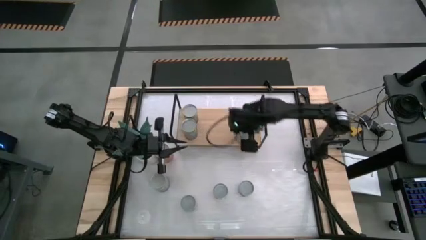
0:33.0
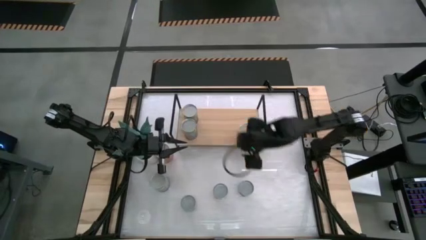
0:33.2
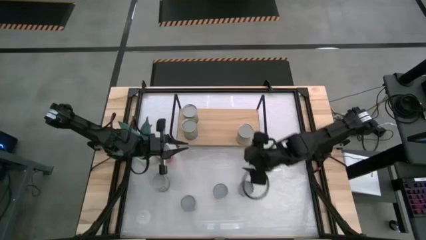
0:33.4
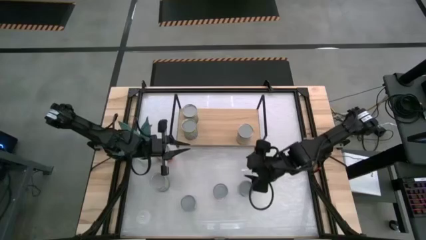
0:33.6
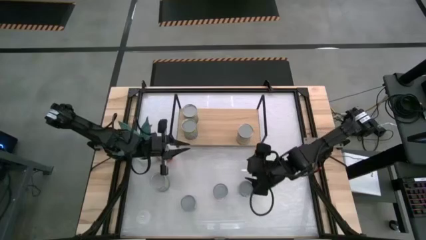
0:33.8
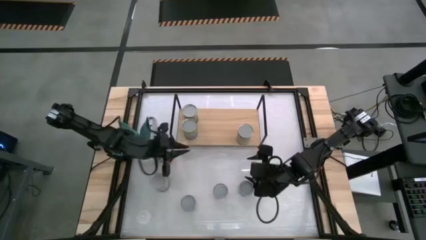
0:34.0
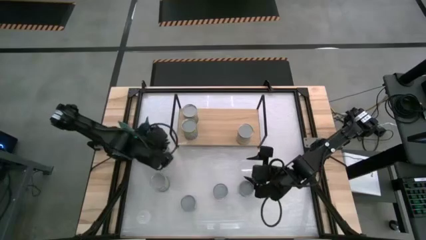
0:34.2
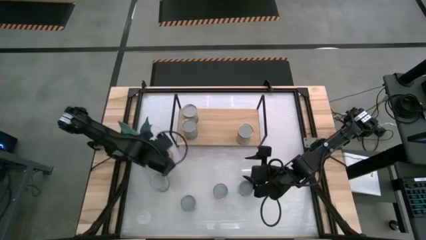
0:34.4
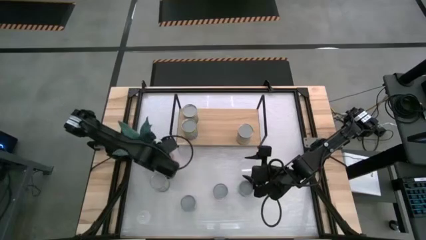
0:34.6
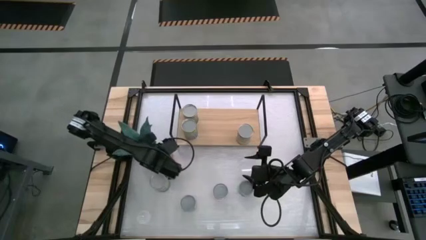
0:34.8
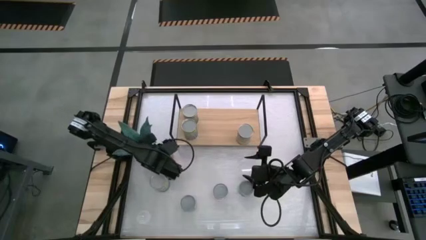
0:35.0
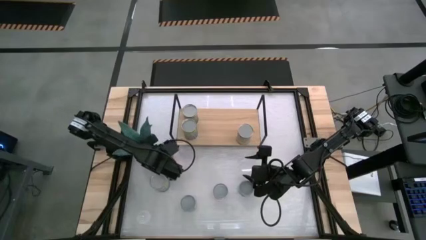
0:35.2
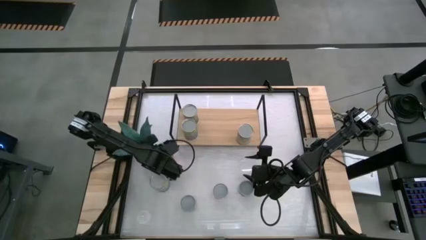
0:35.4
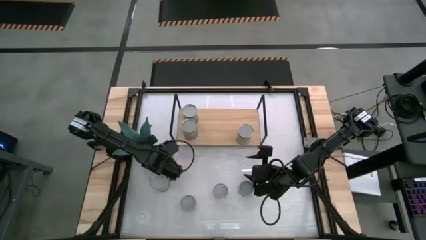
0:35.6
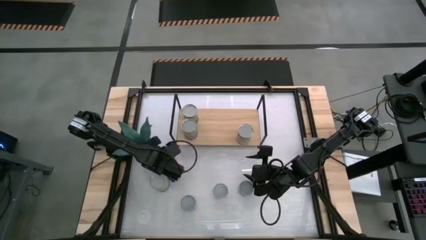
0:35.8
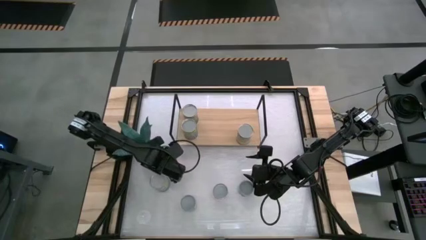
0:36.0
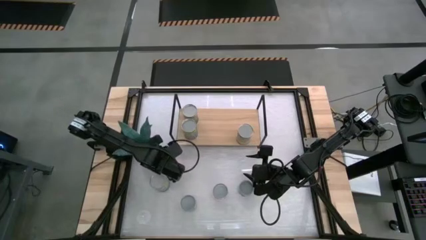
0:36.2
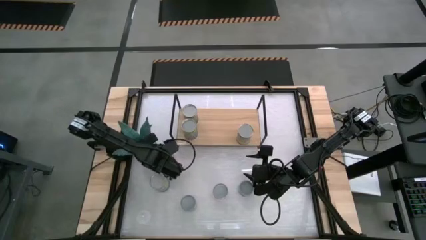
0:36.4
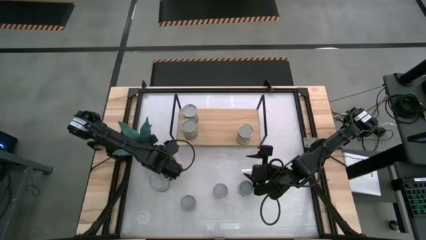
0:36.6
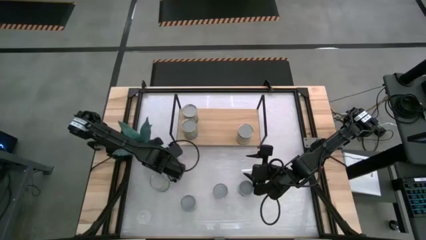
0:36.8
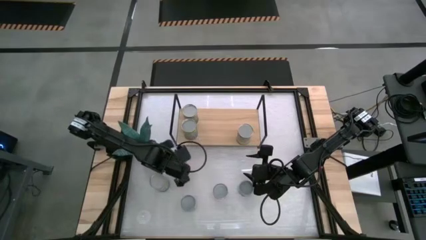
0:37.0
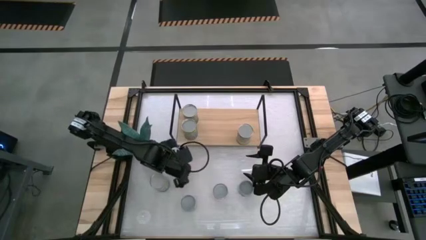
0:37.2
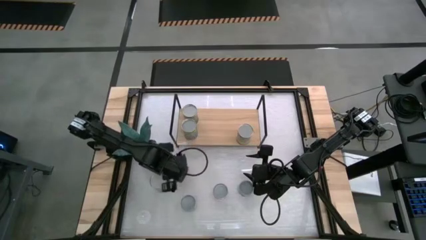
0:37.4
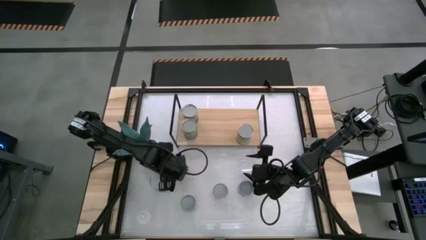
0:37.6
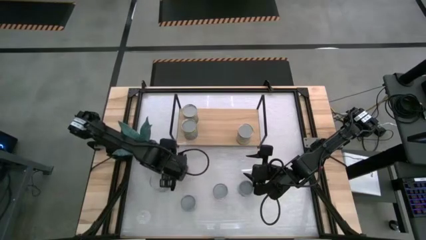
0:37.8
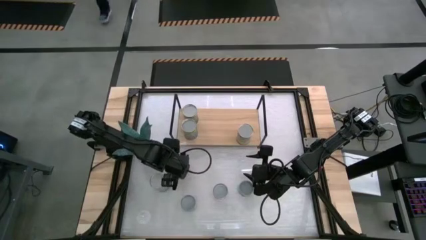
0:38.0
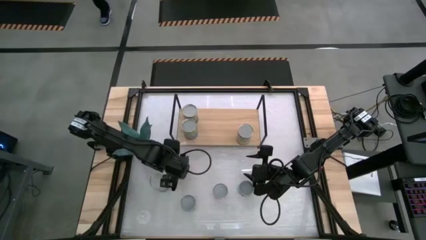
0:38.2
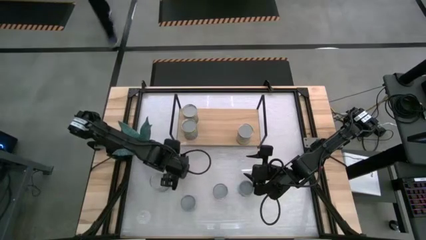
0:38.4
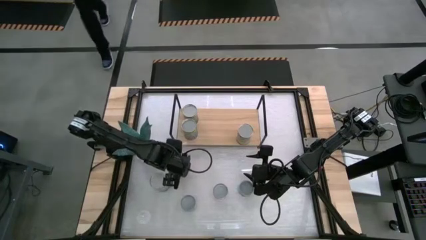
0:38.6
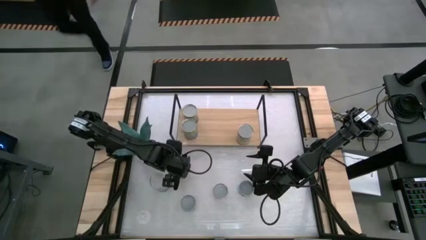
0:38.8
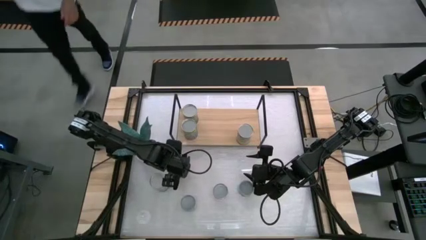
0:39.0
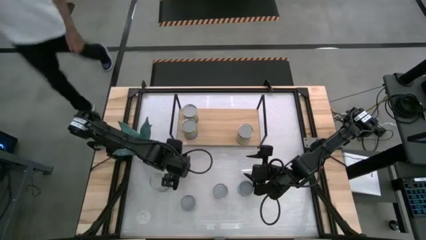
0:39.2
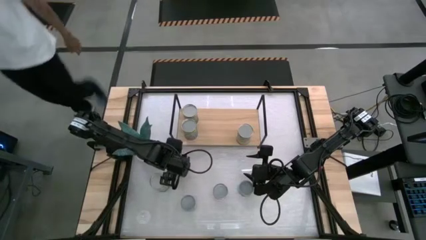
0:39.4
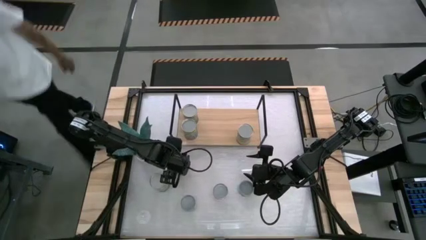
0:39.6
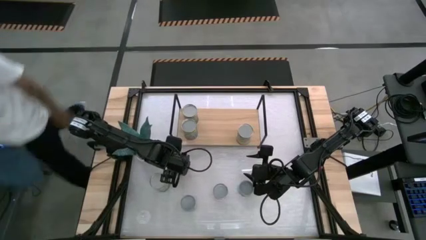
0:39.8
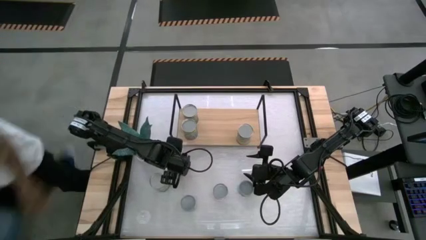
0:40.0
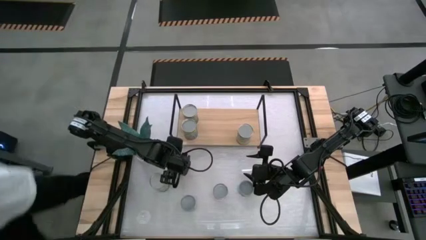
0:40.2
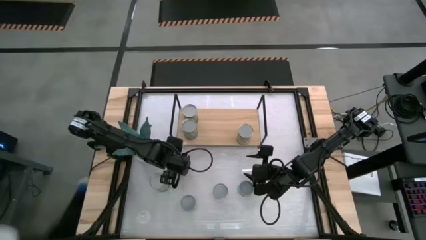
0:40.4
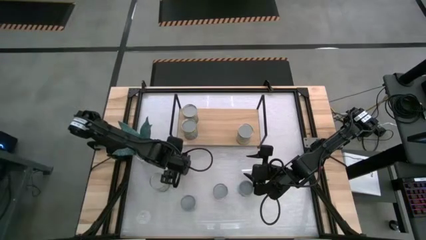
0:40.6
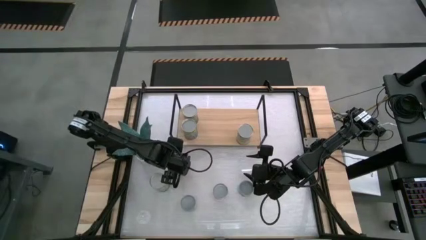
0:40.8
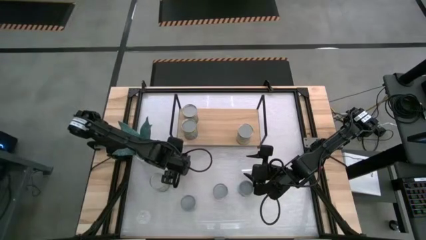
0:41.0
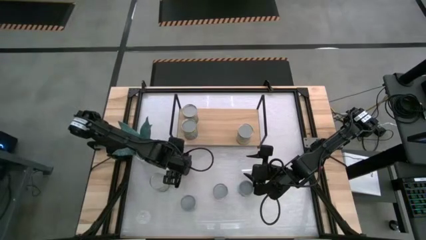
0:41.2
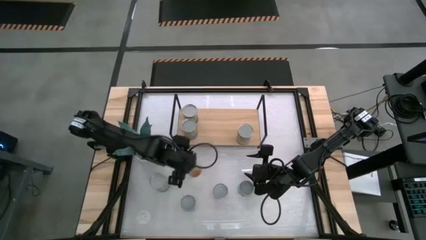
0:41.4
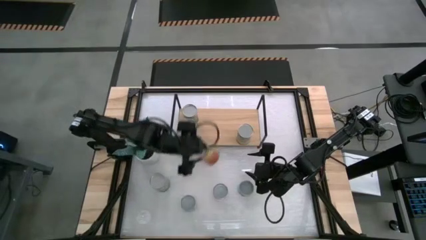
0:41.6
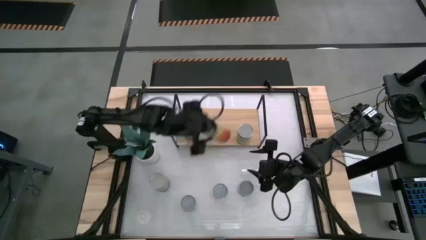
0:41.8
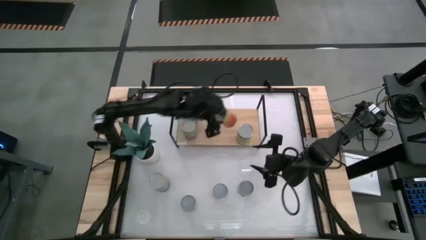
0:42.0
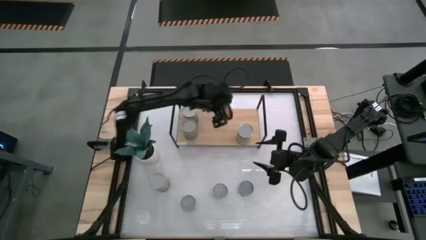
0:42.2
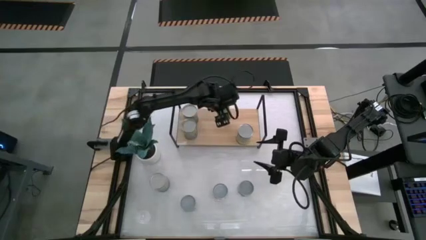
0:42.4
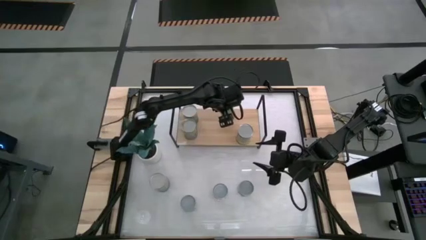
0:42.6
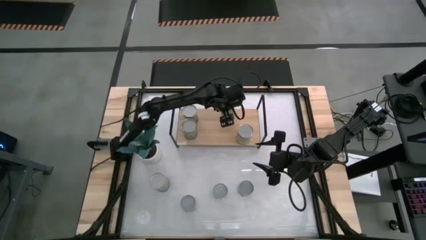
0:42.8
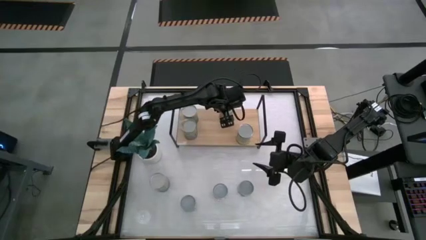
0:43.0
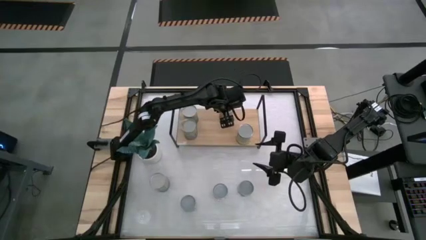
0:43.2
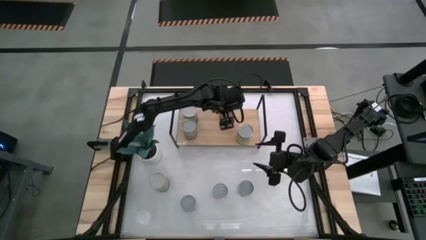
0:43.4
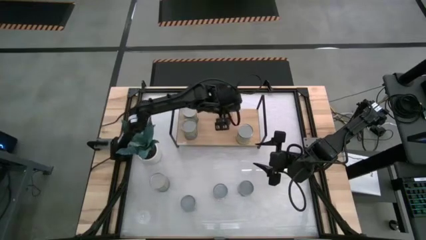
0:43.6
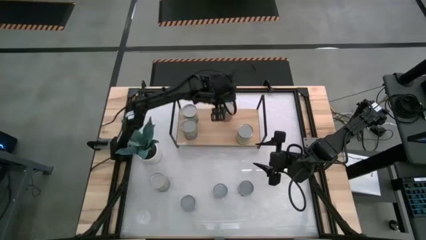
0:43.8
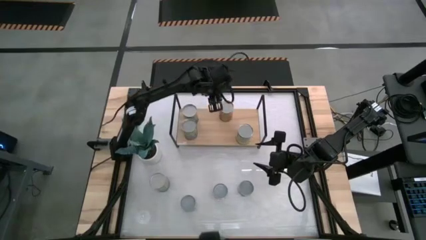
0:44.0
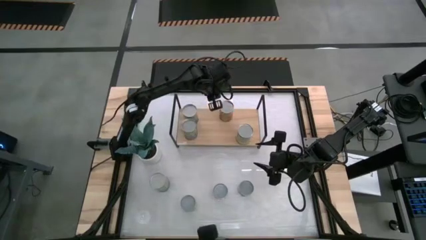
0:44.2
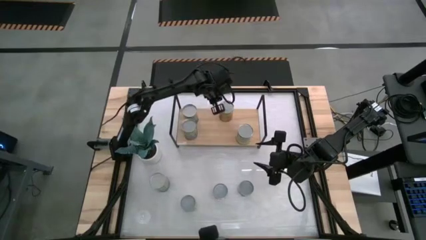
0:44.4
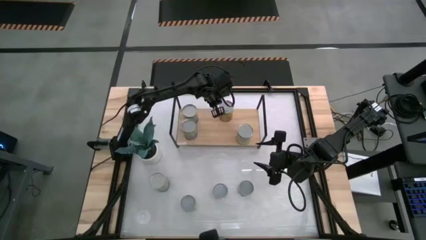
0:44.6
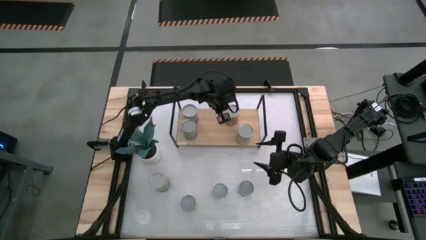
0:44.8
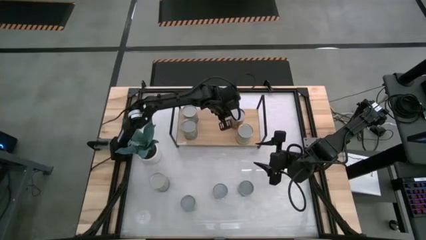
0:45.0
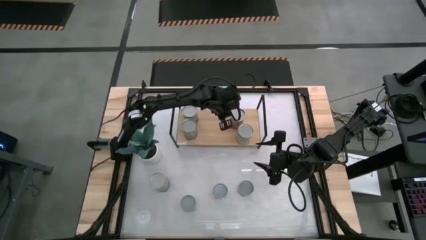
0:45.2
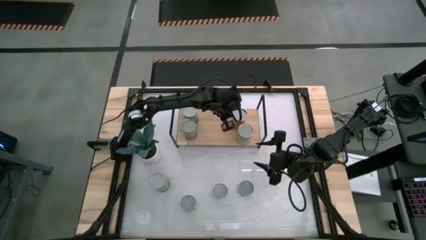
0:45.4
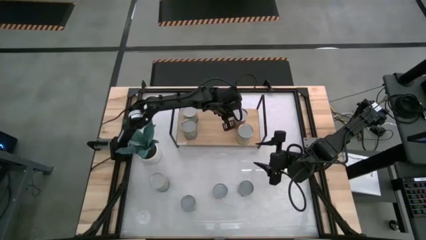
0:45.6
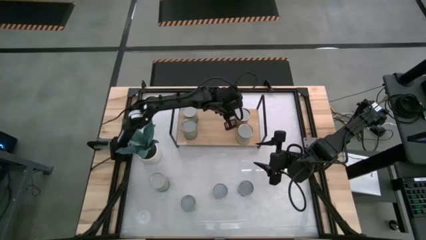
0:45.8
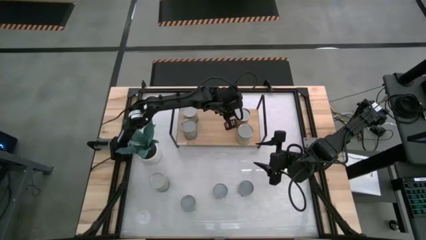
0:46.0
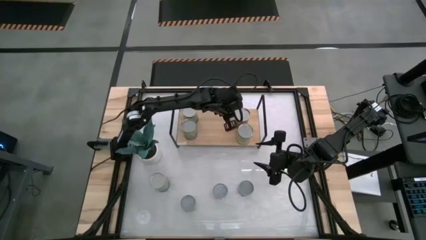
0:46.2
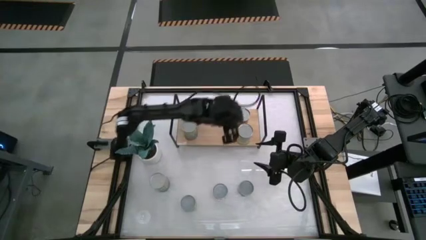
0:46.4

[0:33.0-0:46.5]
Task: Pick and place cans onto a shelf
Put the large canned pineapple on the shelf

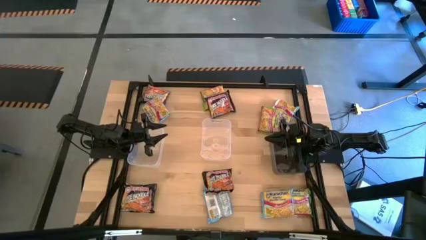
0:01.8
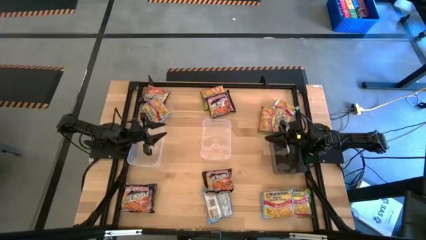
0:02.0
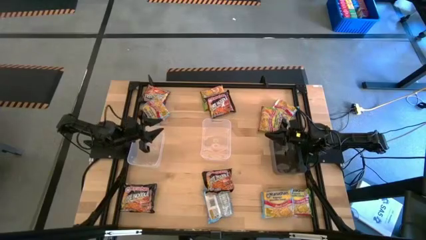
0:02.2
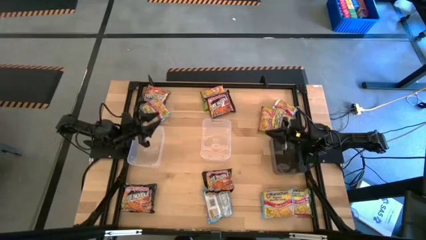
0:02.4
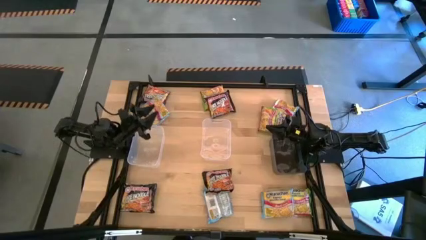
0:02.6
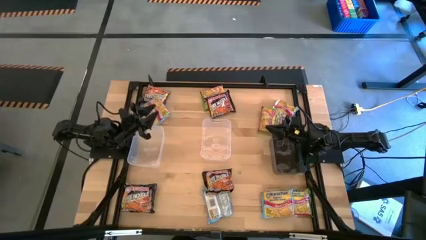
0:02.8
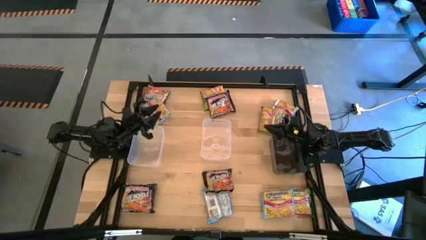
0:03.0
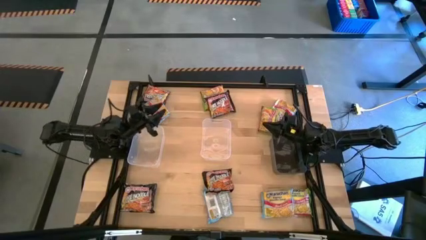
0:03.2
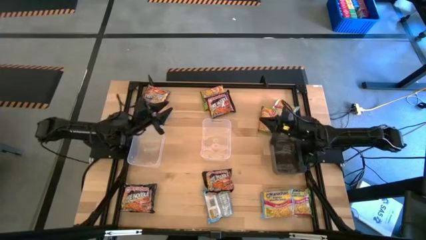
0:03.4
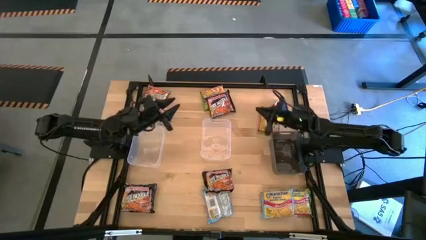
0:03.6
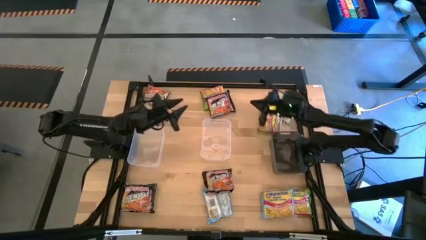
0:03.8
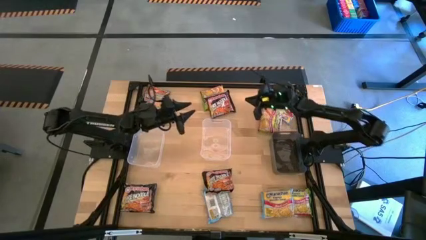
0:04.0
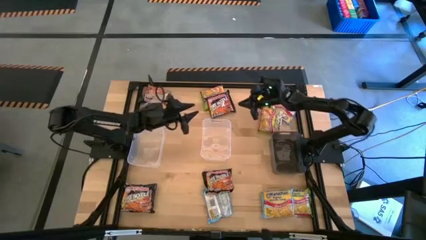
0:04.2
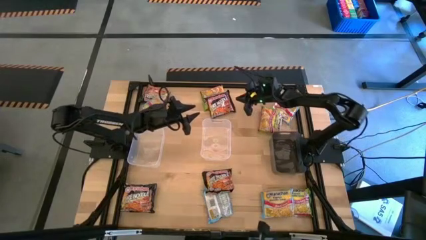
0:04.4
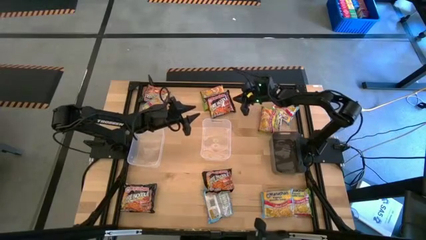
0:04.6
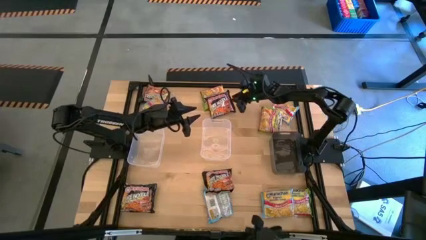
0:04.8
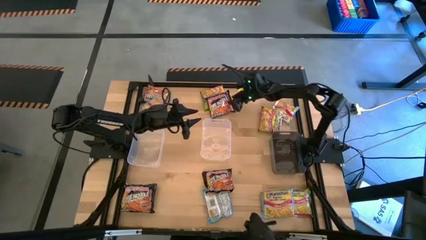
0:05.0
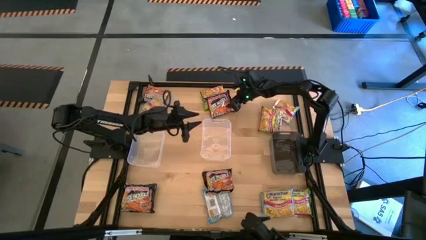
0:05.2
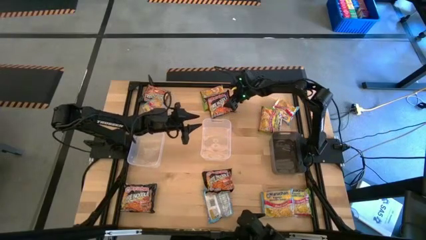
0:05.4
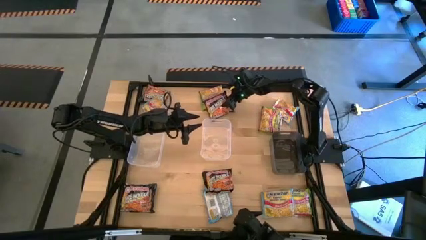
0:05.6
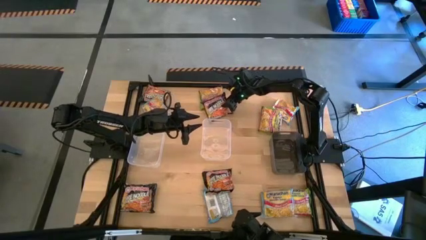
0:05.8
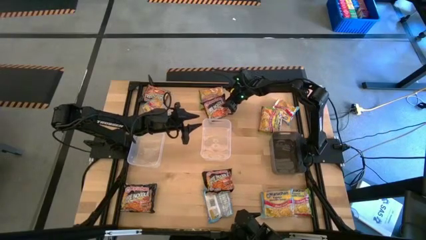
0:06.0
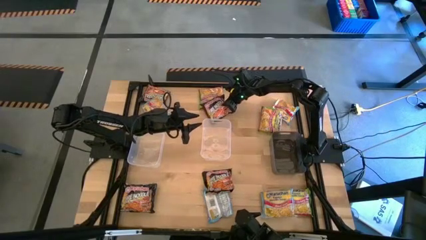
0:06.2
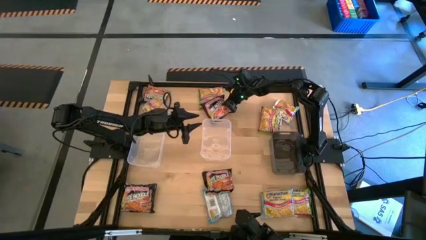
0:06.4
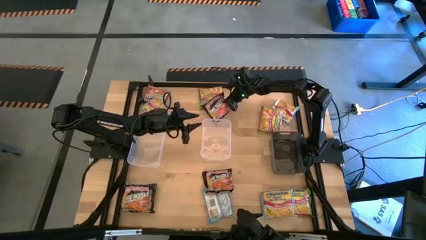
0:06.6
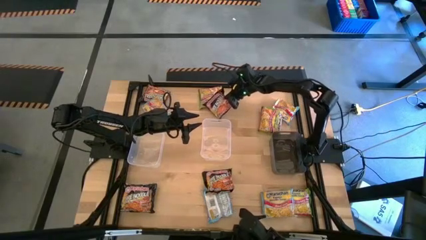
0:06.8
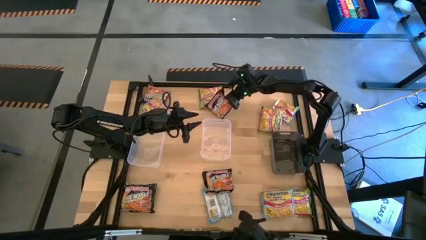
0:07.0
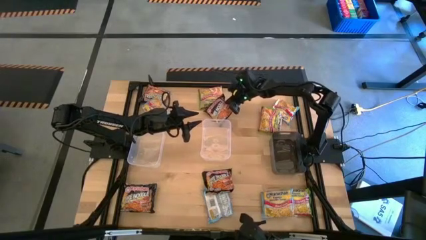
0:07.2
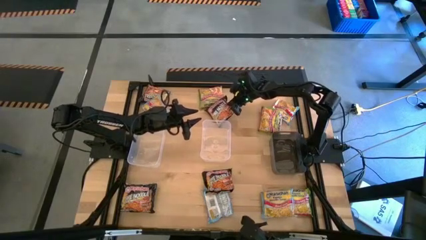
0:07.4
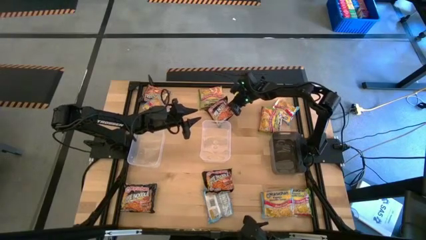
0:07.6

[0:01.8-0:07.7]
Task: Sort Maruchan noodles
Put the black noodle pack into the right transparent bin
